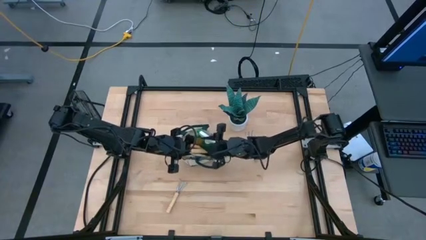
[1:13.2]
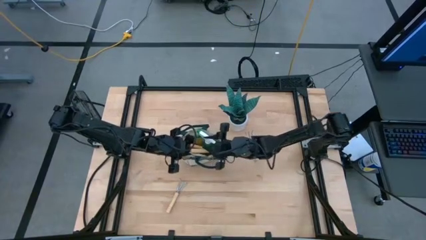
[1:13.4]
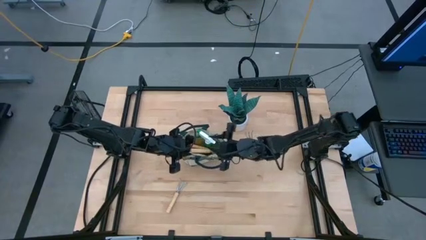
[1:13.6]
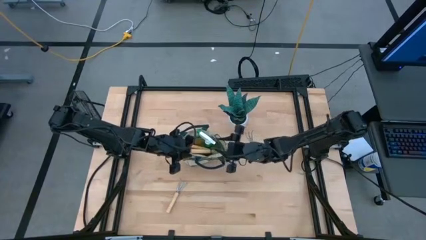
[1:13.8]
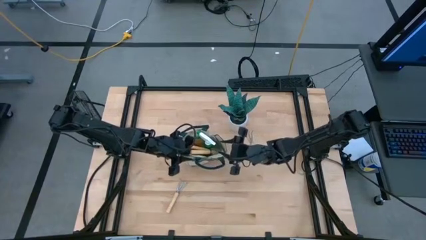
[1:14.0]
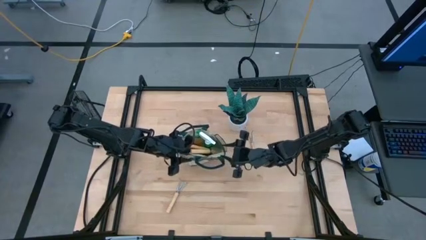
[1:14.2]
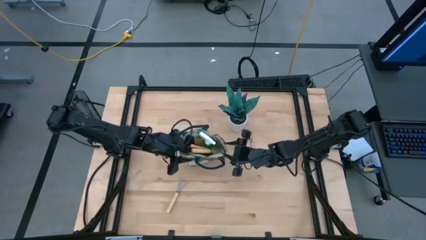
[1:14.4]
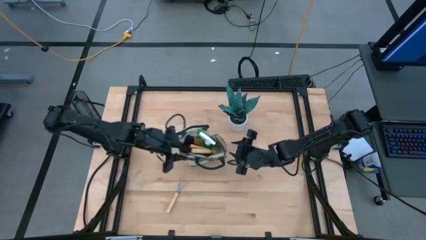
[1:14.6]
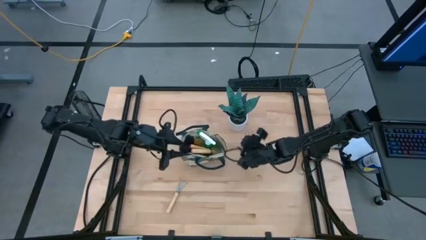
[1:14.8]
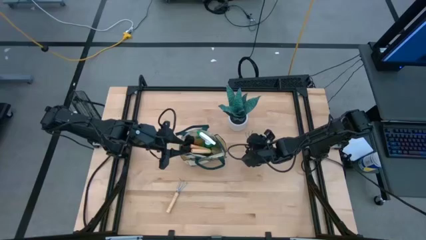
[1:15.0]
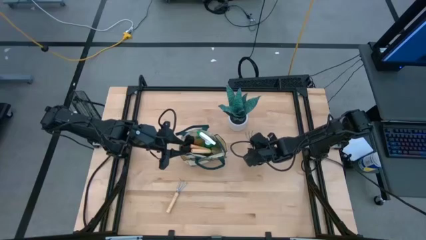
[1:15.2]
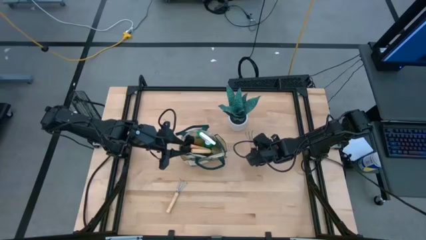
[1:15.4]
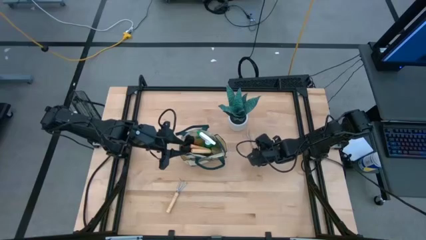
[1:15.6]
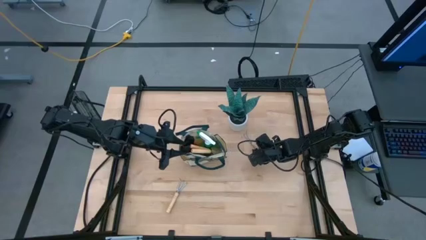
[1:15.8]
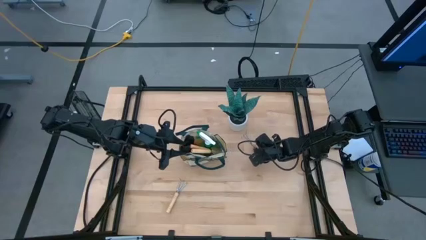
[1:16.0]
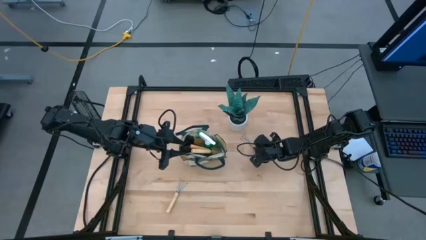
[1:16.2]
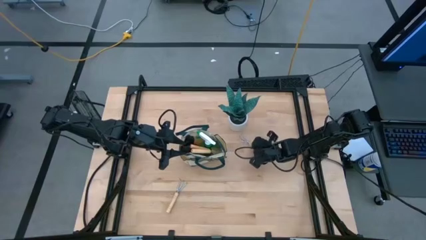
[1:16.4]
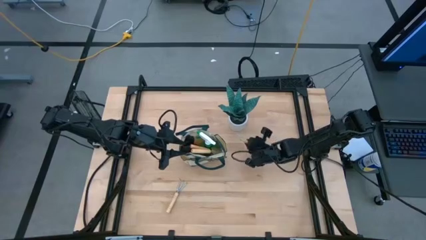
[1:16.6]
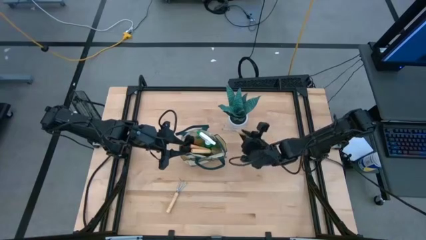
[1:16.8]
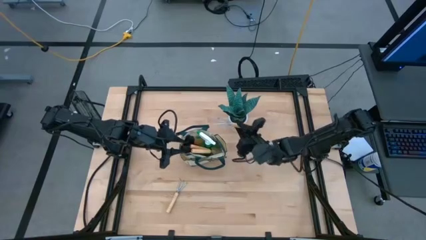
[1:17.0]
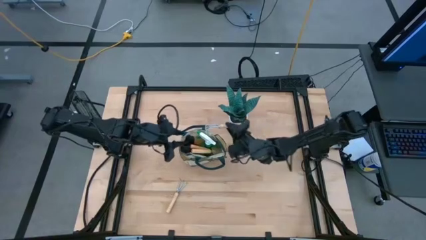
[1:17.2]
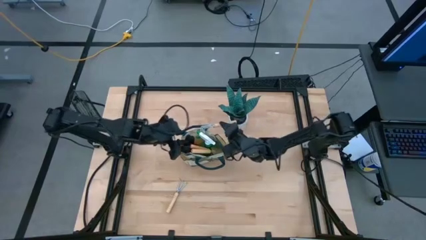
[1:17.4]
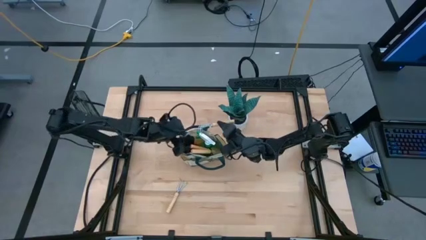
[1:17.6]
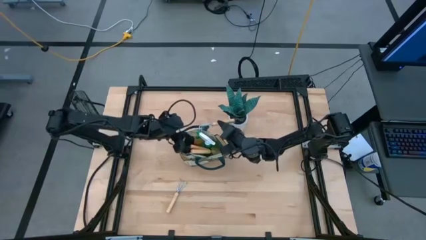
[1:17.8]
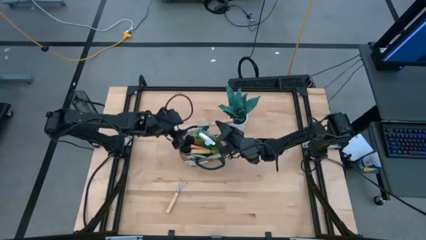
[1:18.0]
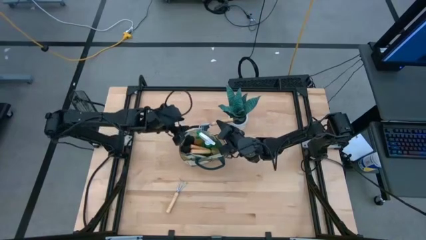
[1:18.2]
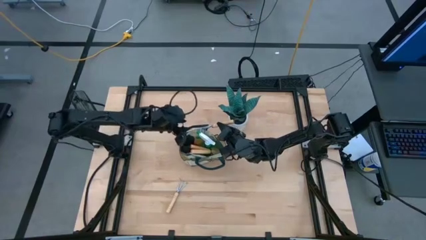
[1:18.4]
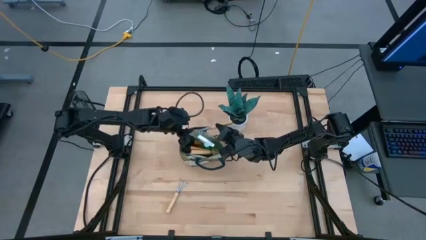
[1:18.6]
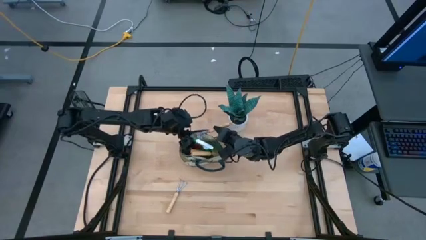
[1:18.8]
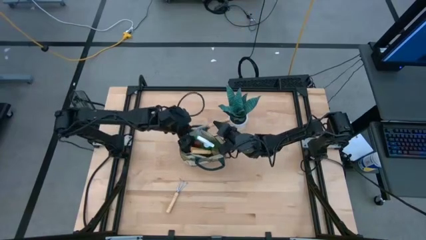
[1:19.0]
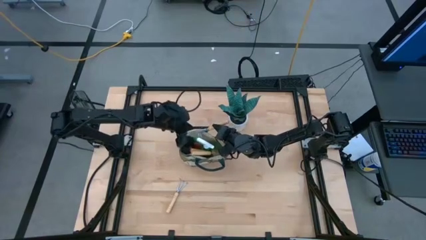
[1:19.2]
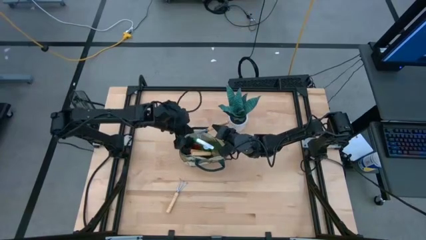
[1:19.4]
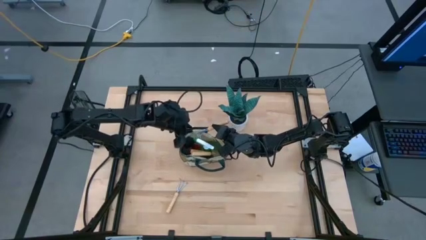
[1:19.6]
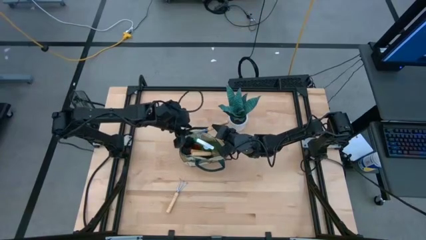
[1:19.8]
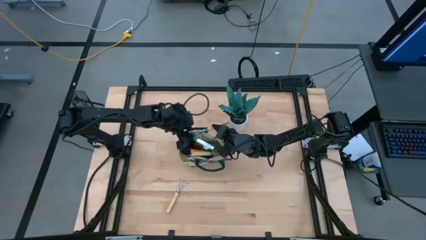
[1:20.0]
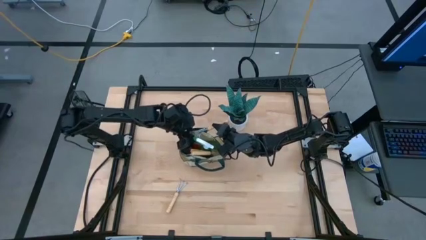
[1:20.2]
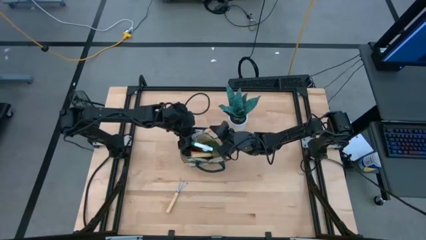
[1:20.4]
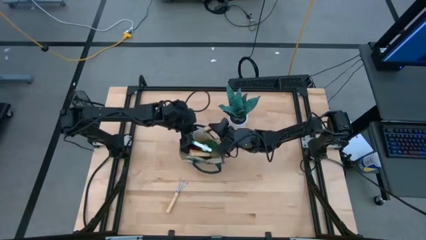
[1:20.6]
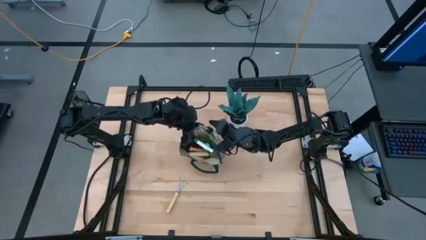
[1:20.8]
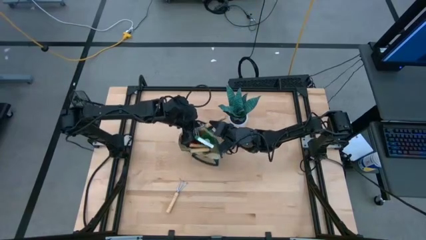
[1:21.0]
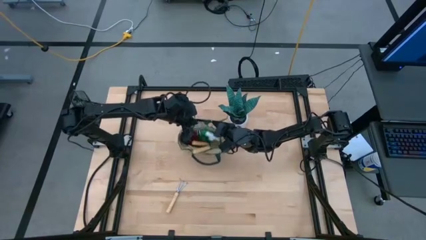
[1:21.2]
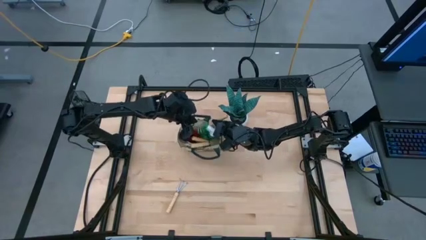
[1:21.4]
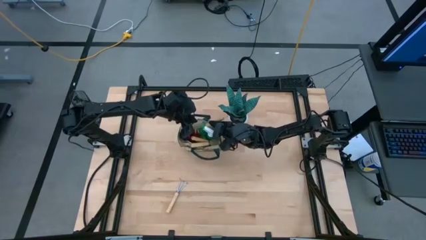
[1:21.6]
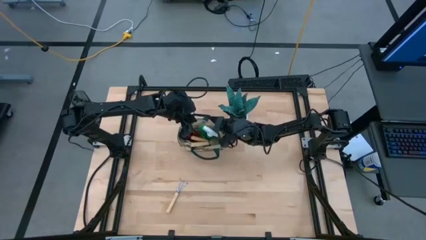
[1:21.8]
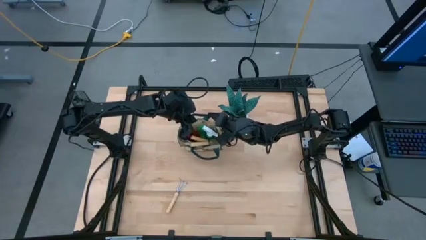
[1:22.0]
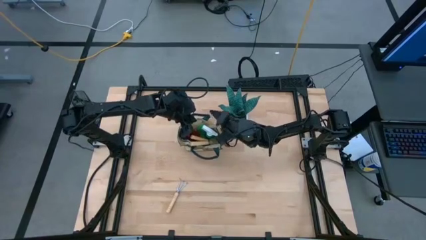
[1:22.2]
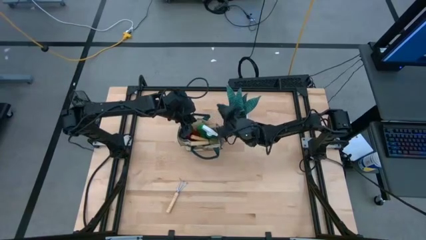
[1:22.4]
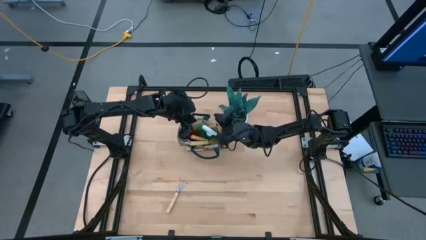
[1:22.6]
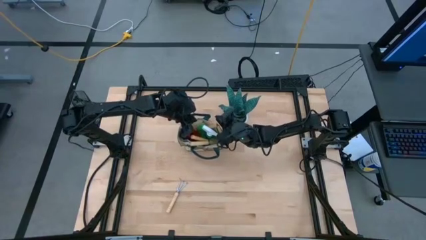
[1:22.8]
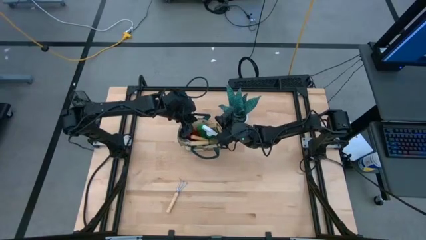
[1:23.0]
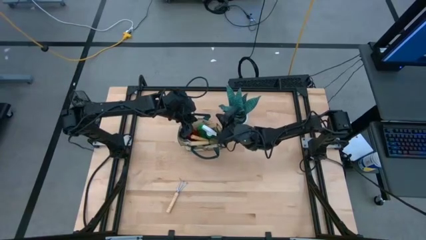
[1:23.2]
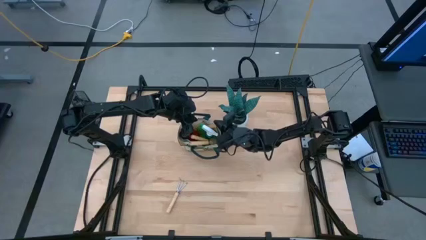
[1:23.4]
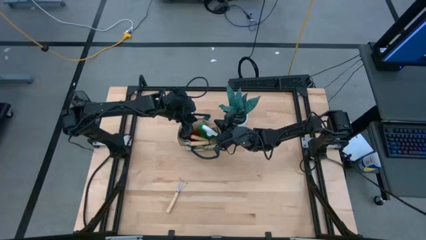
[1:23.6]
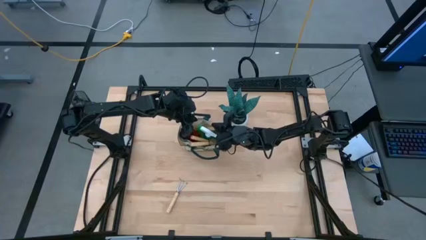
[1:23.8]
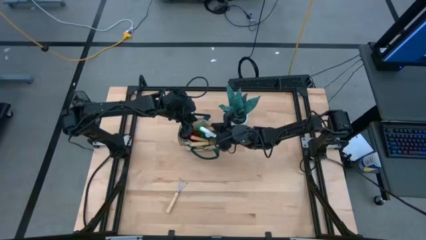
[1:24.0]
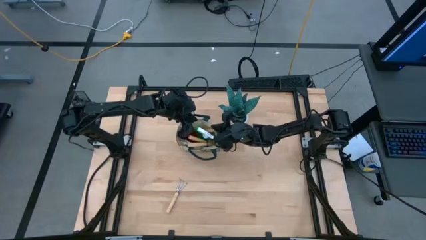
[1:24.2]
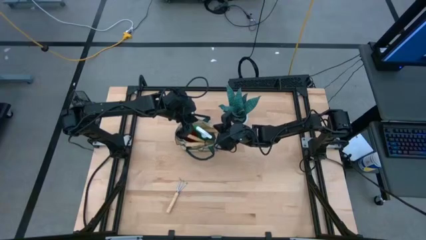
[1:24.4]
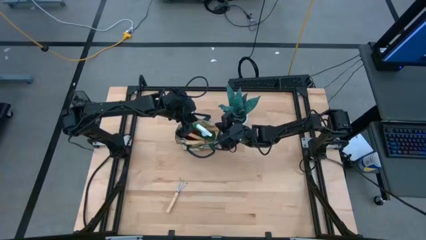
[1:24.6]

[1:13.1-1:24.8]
Task: Pick & Place Garden tools in Gardening bag
Put the top brown hand rake into the white gardening bag

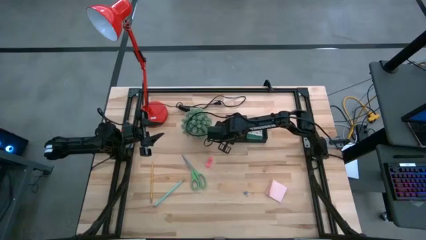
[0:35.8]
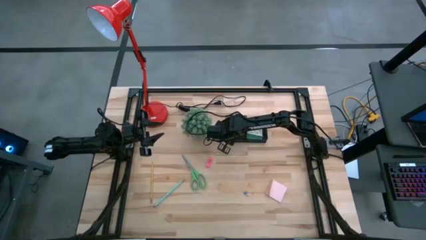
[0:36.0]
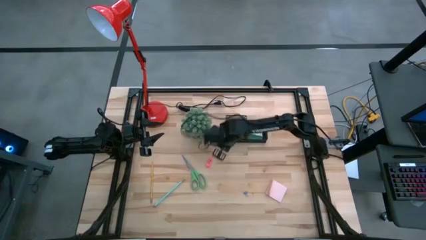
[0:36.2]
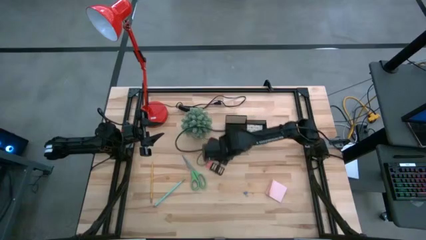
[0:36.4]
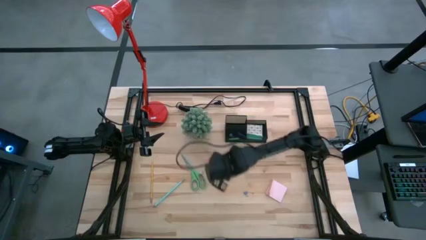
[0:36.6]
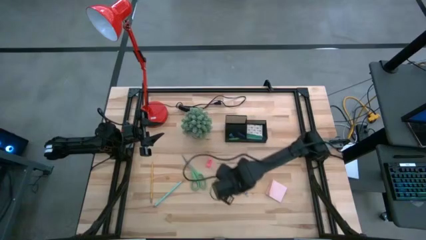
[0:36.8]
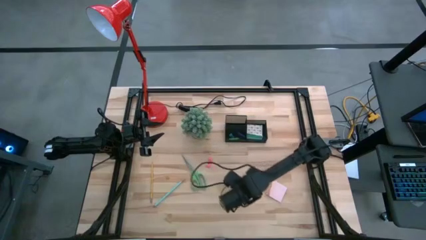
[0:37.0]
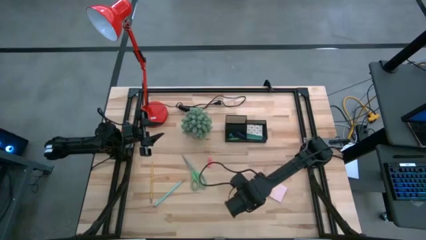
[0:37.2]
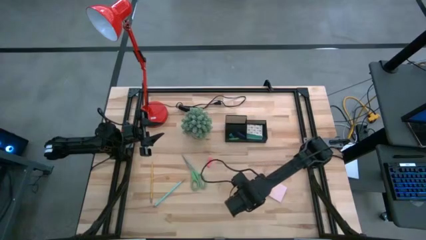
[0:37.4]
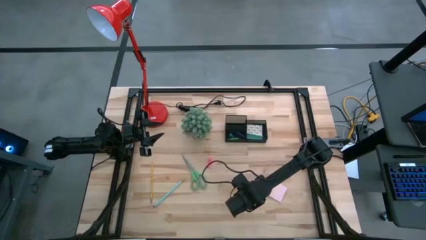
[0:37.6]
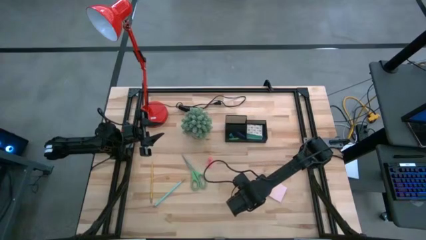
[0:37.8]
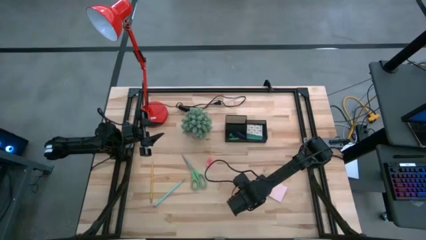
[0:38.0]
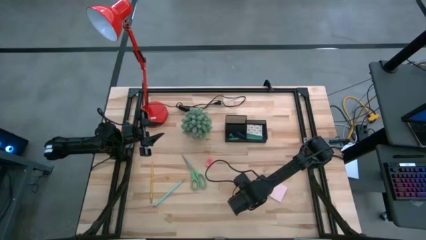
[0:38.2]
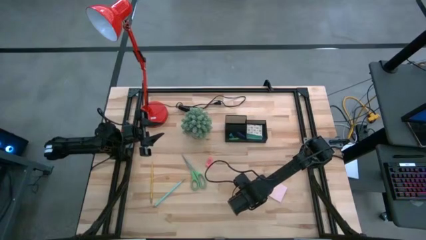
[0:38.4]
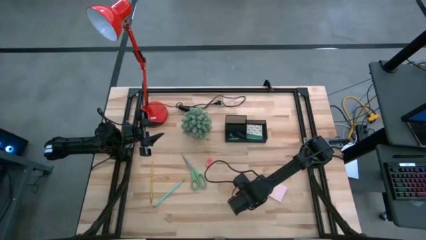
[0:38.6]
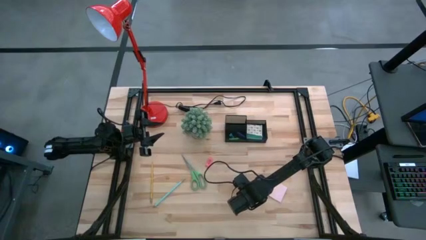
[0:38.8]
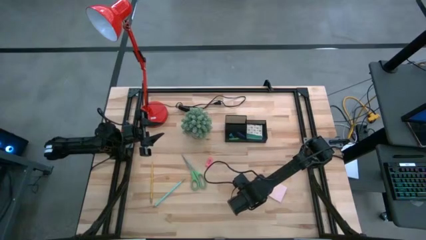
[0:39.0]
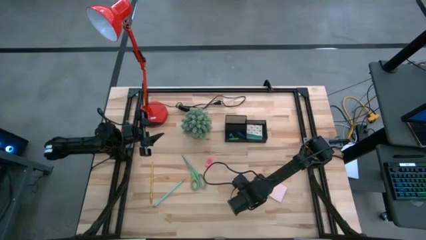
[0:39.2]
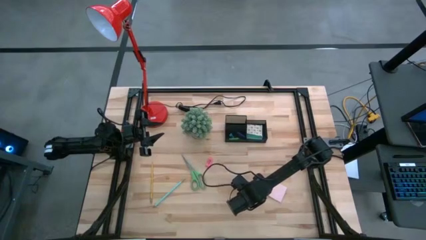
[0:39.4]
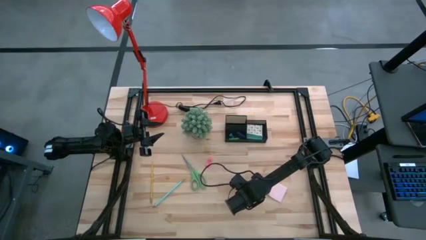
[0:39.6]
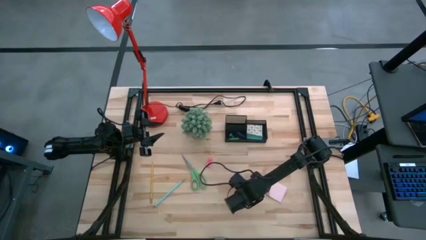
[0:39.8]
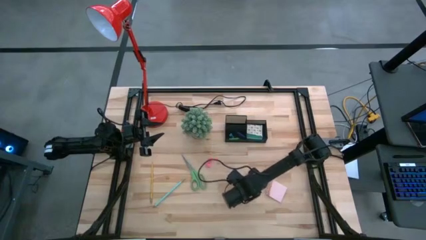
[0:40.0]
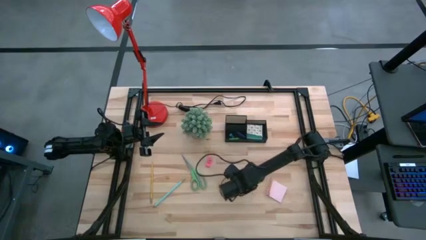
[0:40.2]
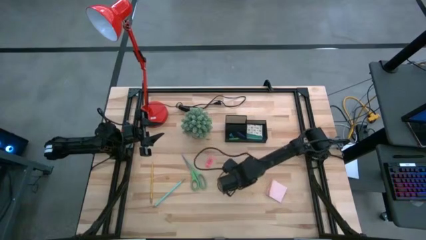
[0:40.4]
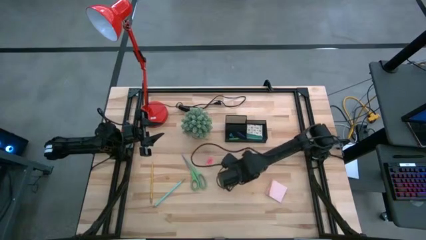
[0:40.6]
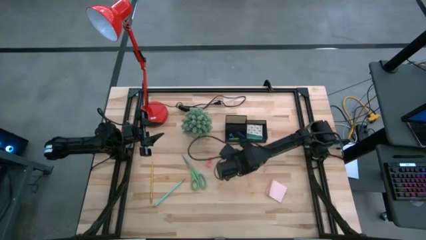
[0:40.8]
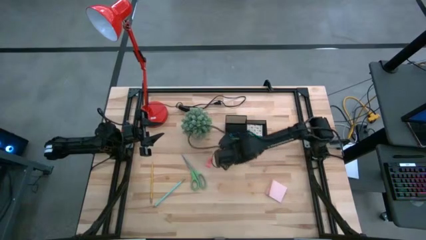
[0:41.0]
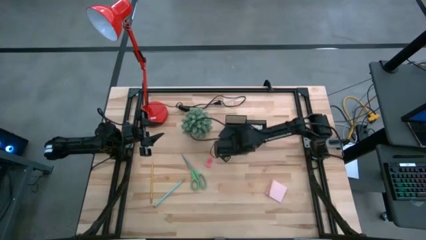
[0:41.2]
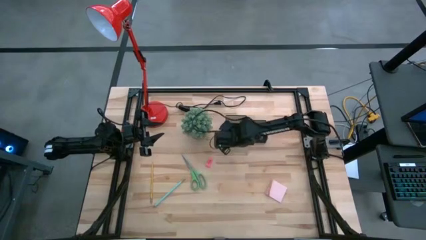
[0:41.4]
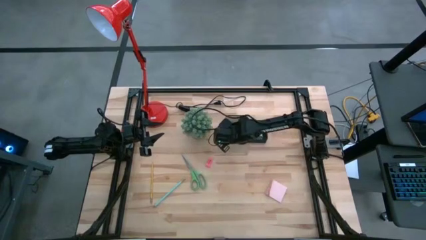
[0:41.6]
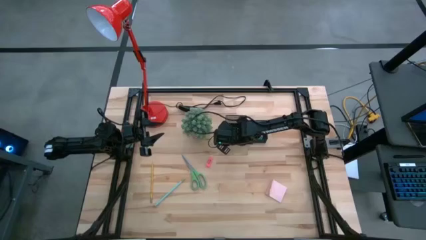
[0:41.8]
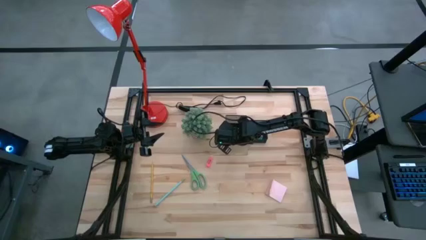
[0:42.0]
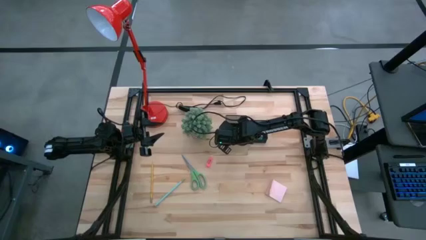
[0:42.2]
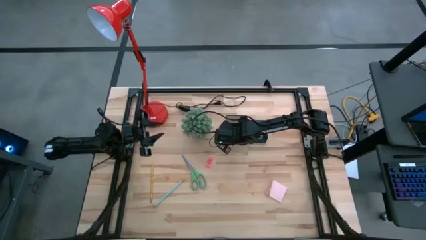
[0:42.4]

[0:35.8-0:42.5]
Task: Pick and place office supplies into organizer
Put the blue binder clip into the black desk organizer
